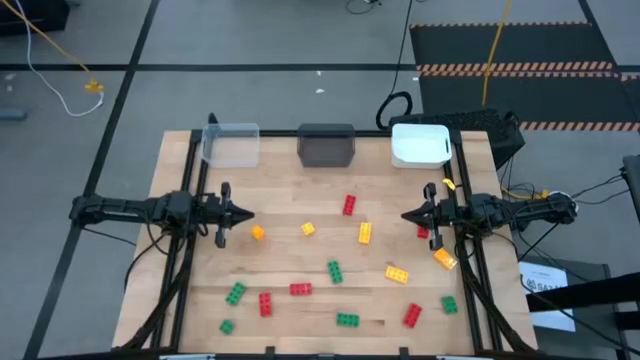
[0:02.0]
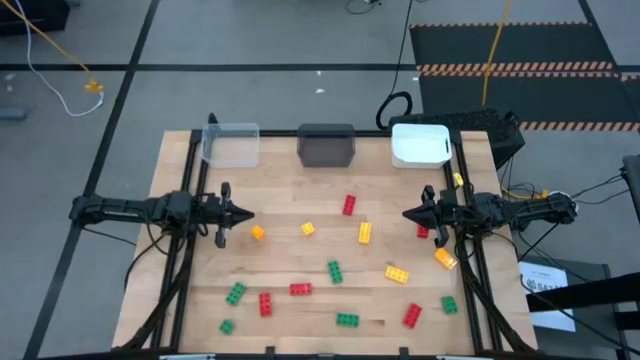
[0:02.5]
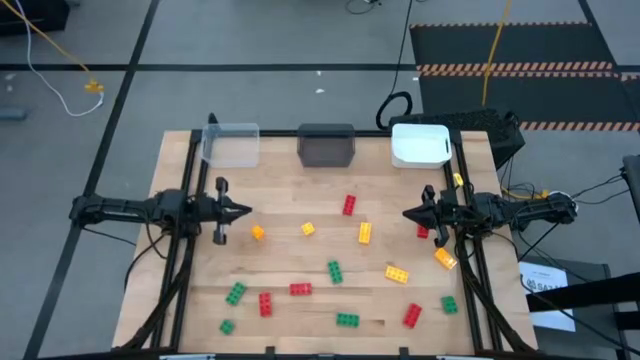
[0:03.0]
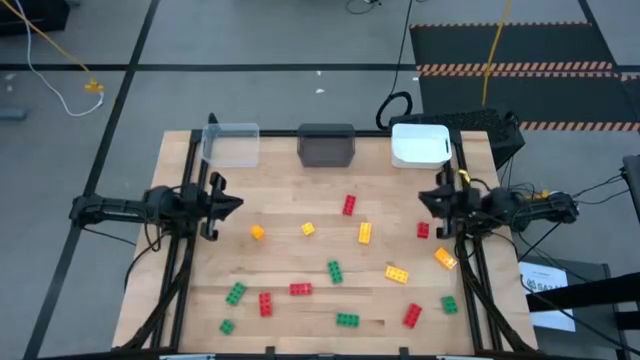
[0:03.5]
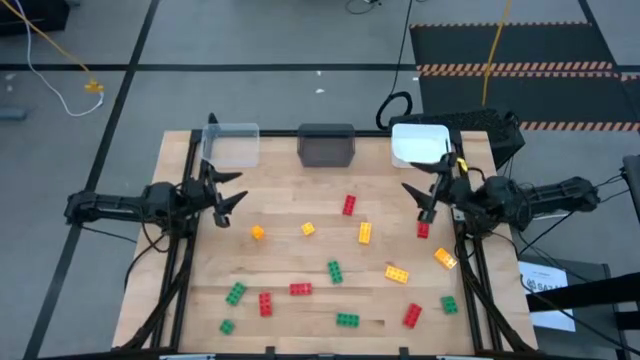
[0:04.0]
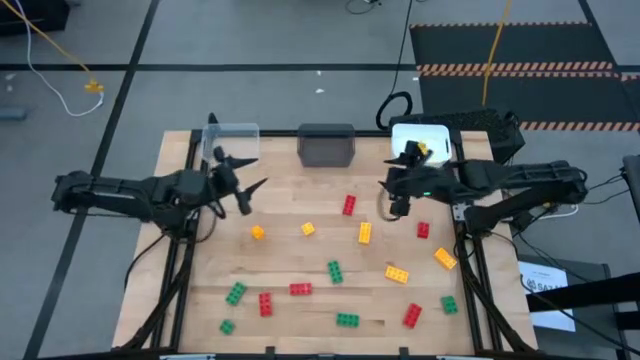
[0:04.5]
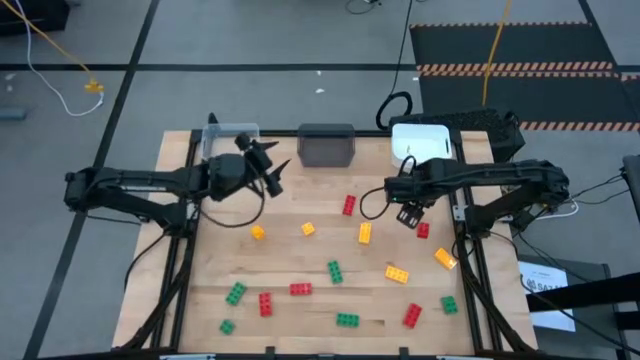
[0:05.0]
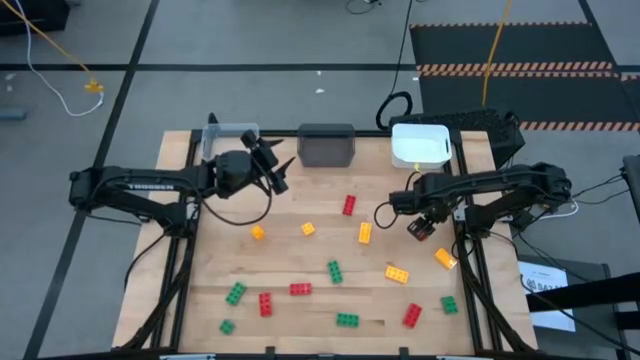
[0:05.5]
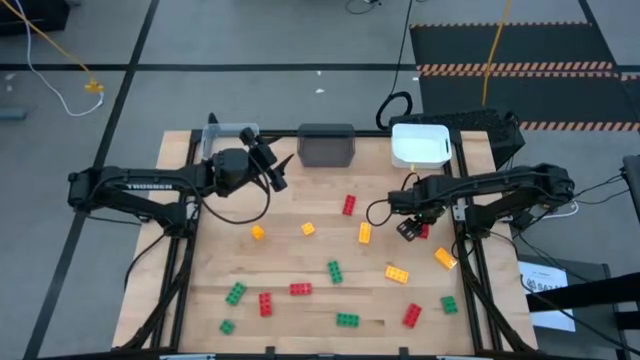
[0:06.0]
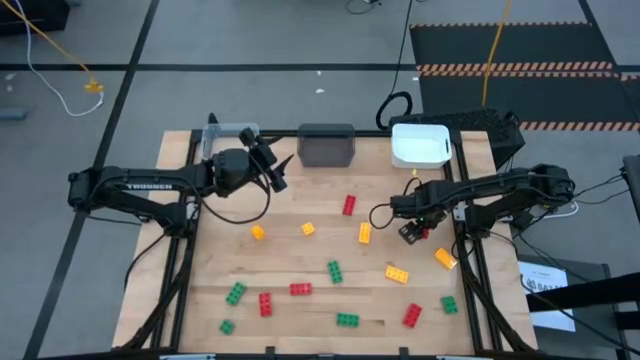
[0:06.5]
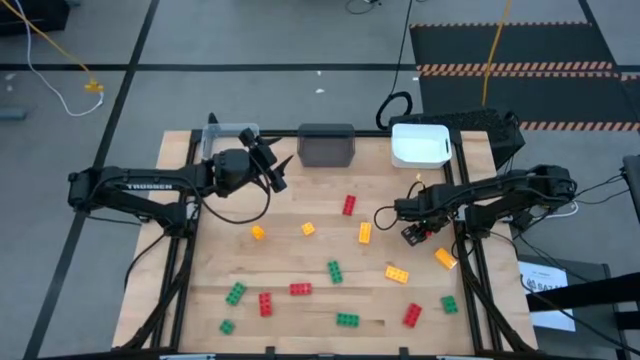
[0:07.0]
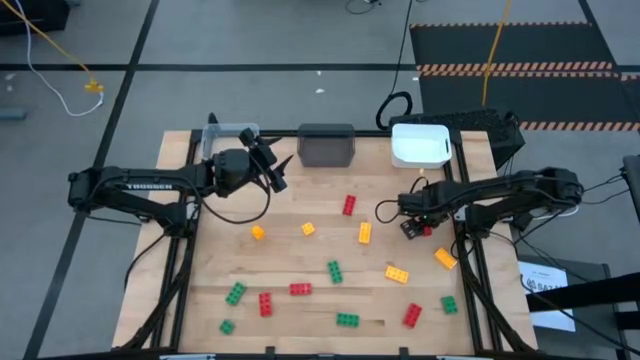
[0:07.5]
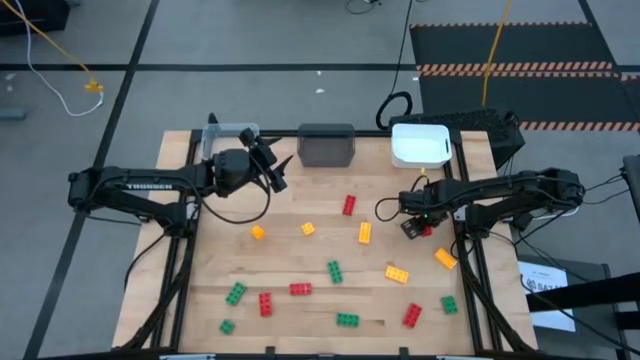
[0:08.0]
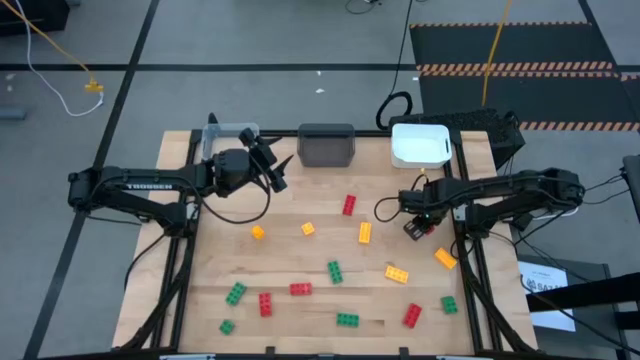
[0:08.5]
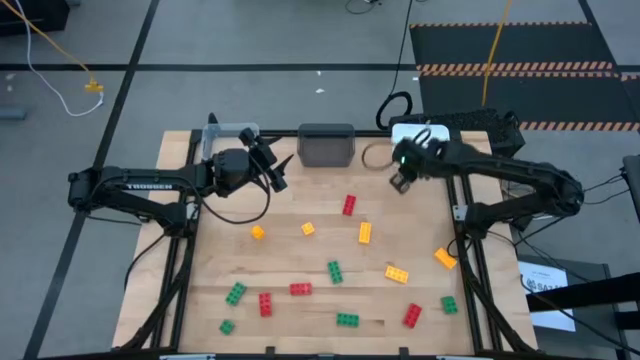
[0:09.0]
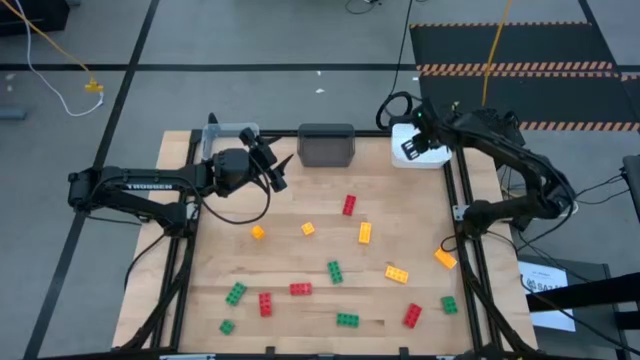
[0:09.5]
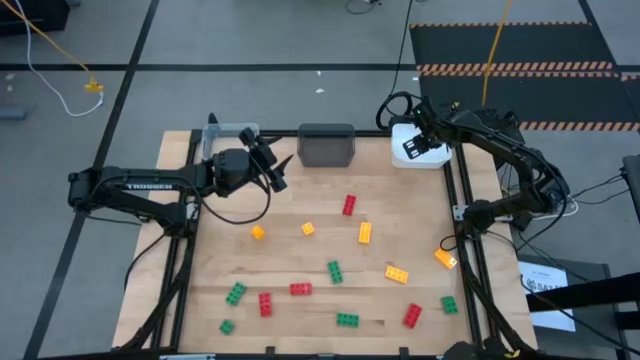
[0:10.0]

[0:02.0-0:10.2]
Task: Sort & place blocks by color
Put the 4 stud red game piece into the white bin

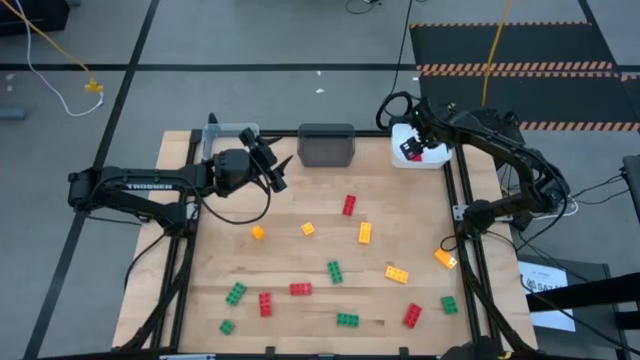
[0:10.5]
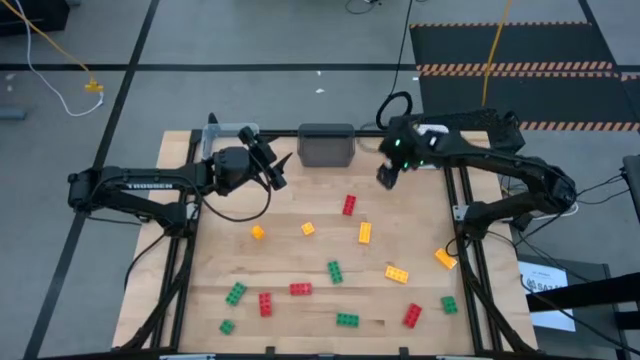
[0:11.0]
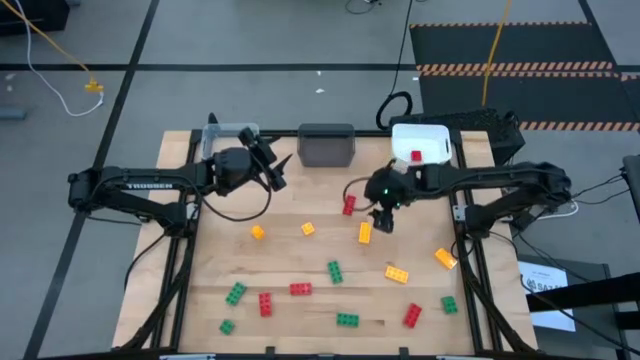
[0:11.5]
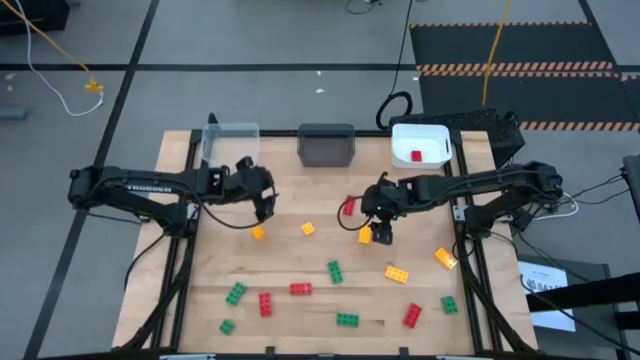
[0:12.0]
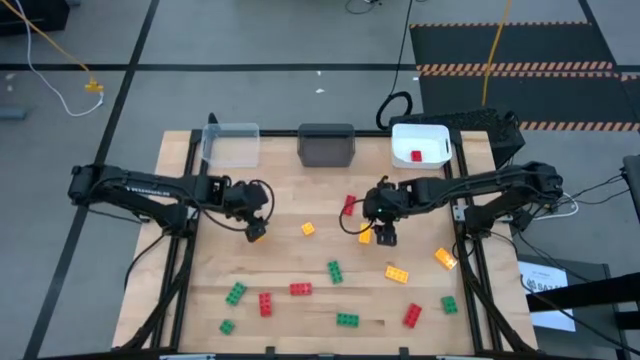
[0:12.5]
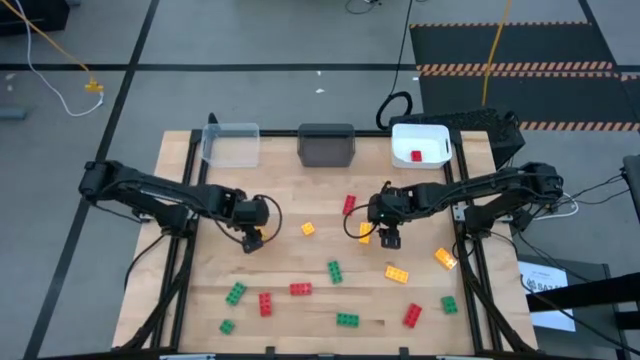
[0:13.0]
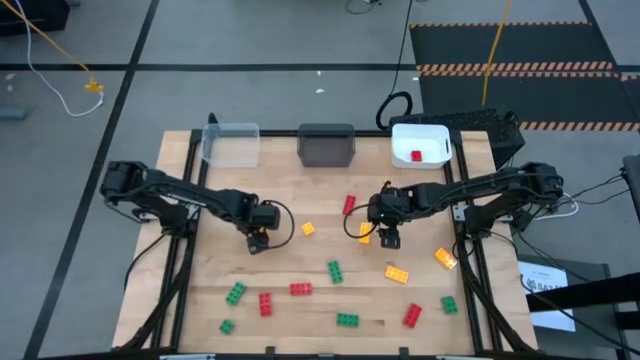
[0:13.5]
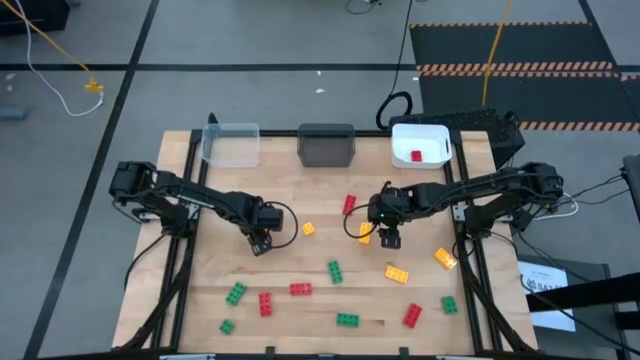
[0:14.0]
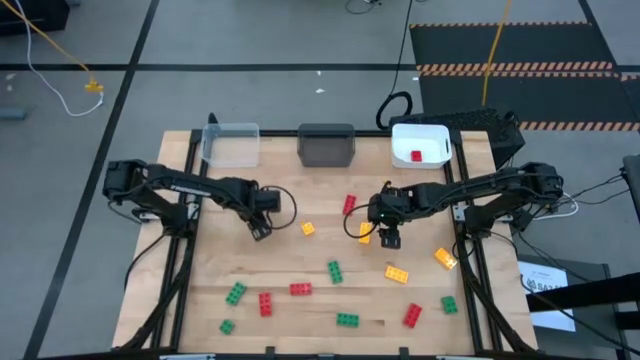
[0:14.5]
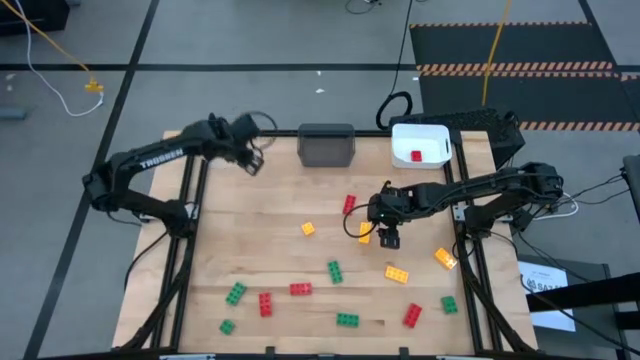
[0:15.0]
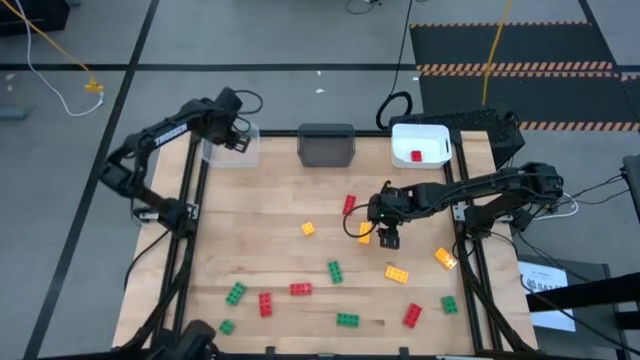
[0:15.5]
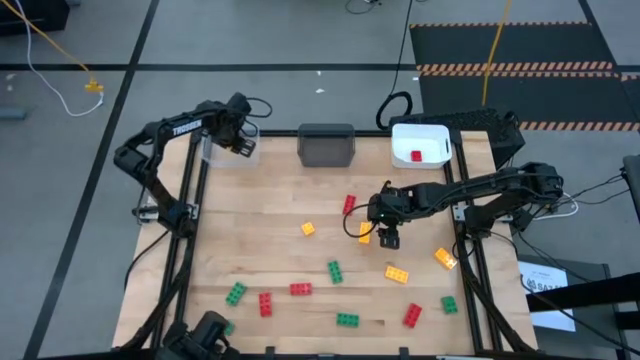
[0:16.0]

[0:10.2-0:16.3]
Put the 1 stud yellow game piece into the transparent bin

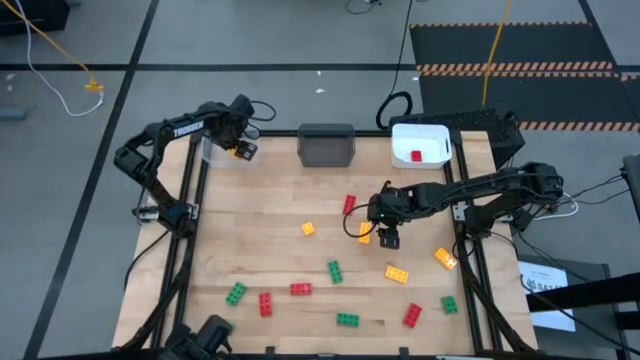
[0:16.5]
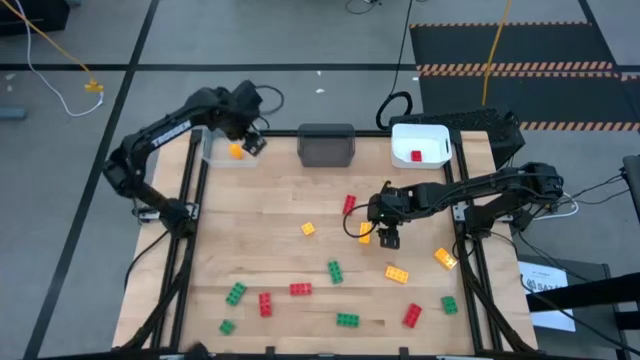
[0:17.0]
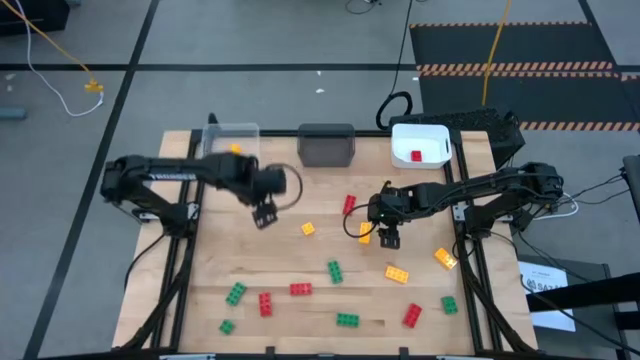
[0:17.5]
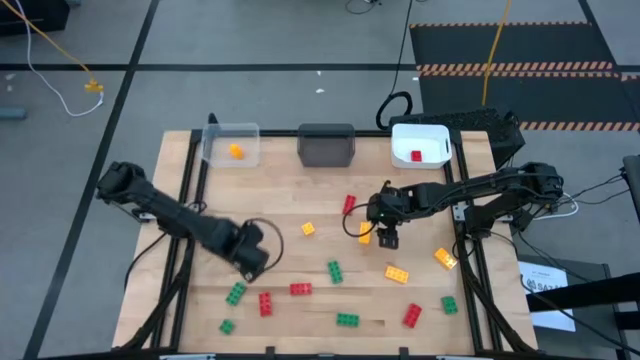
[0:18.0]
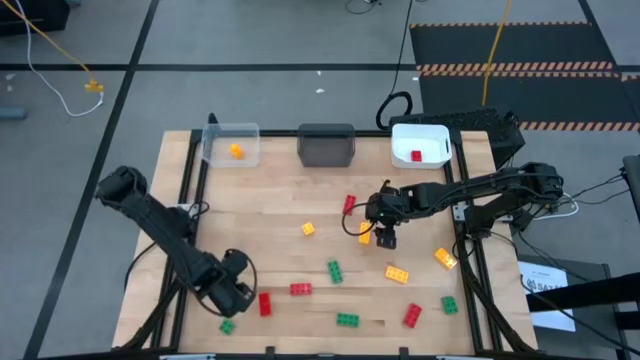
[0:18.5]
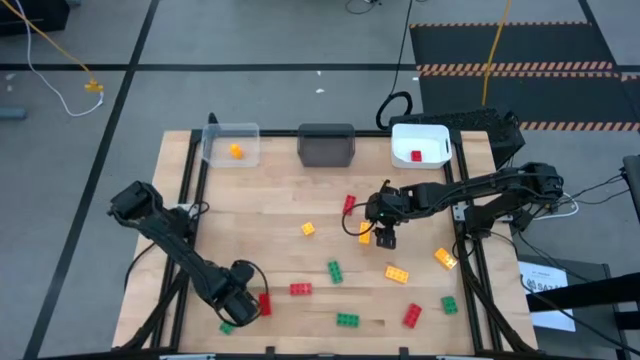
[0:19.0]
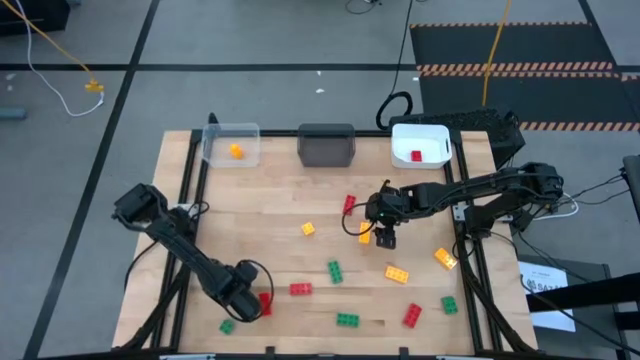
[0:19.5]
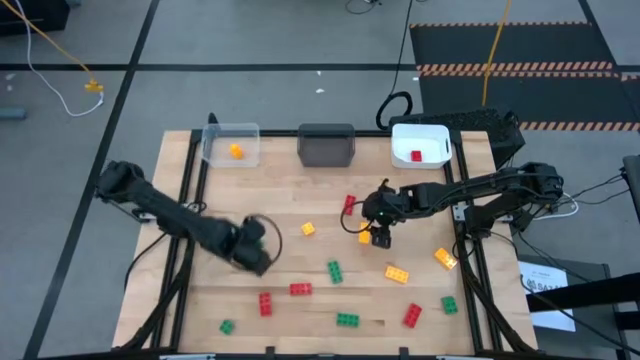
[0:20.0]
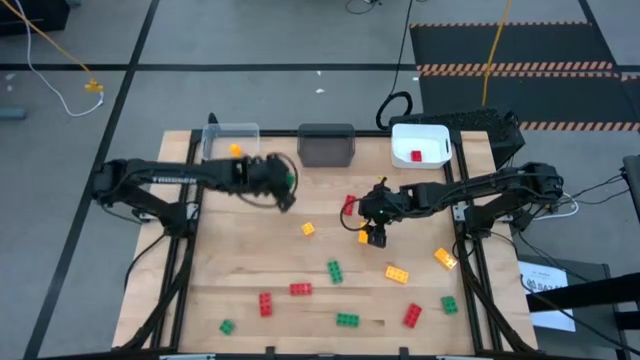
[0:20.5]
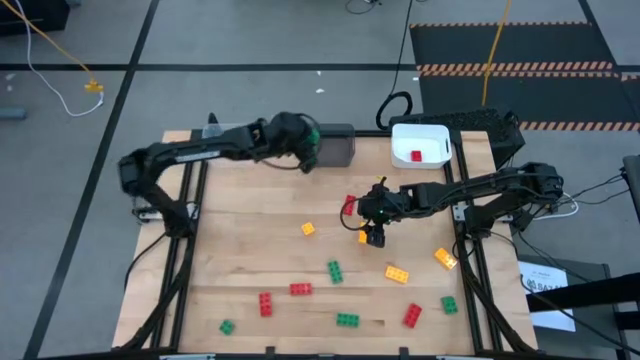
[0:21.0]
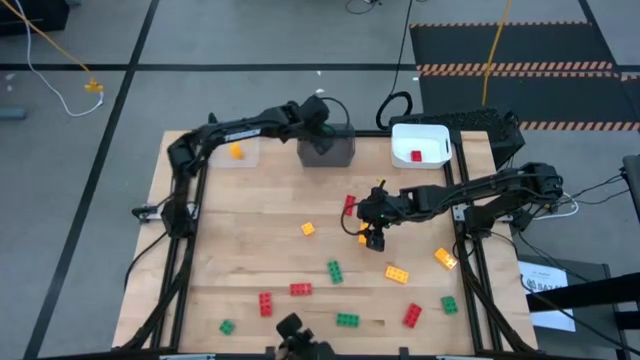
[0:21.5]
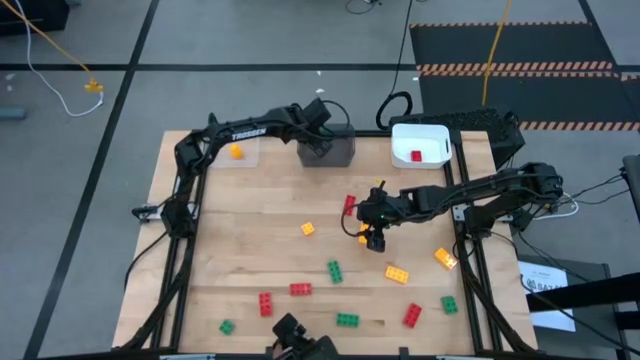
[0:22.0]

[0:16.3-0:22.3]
Put the left 8 stud green game piece into the gray bin
